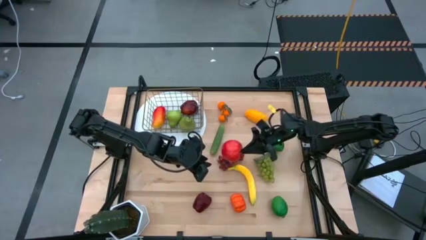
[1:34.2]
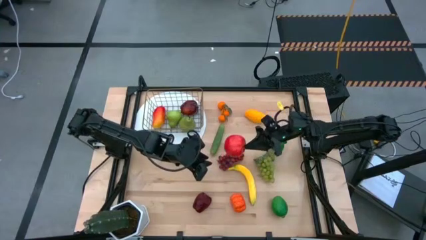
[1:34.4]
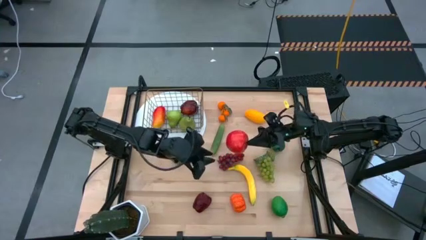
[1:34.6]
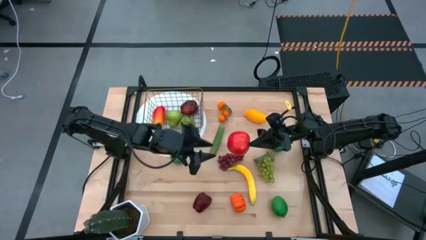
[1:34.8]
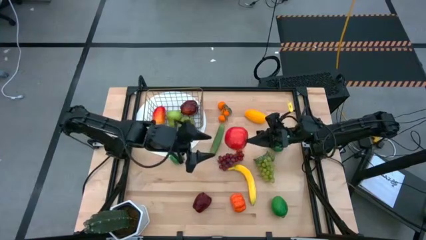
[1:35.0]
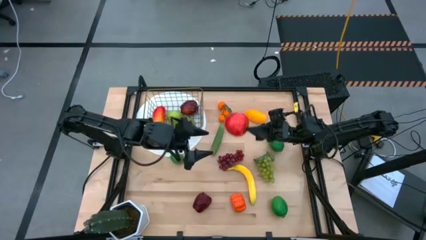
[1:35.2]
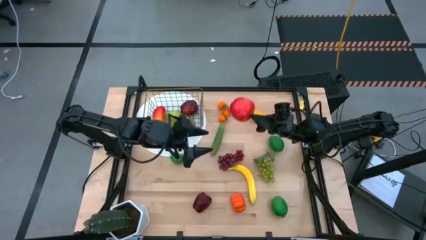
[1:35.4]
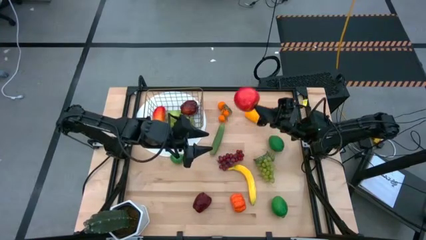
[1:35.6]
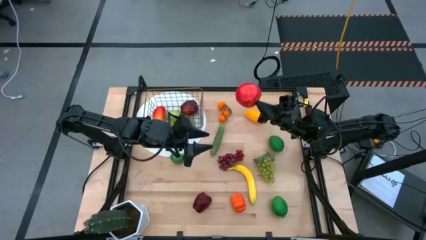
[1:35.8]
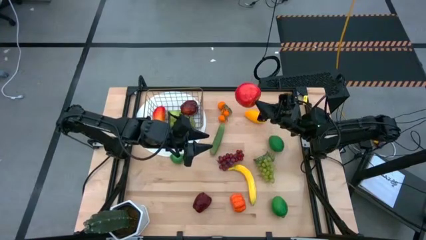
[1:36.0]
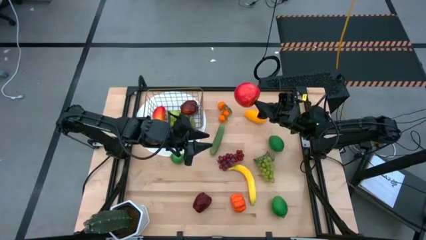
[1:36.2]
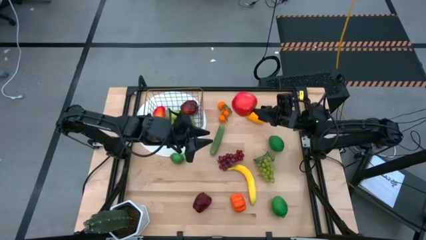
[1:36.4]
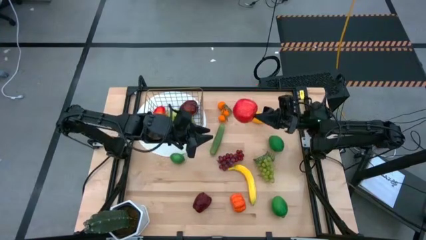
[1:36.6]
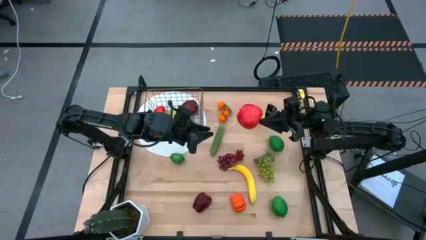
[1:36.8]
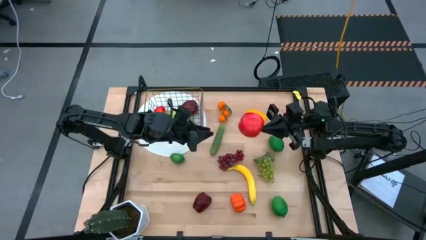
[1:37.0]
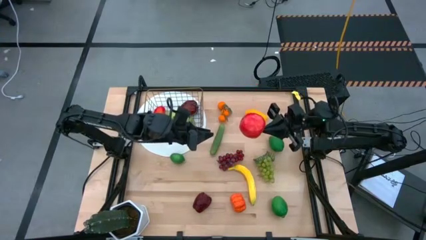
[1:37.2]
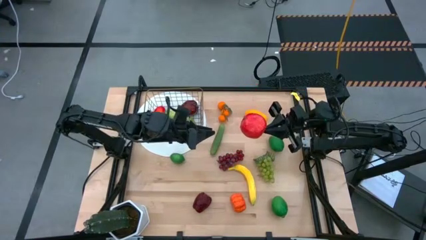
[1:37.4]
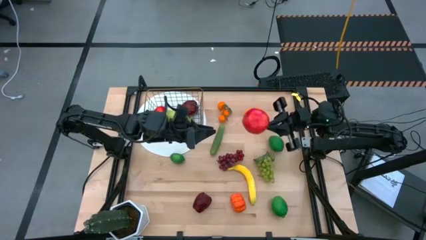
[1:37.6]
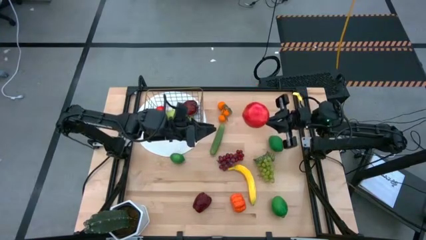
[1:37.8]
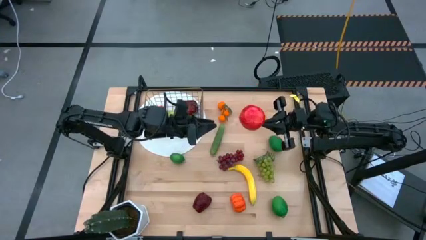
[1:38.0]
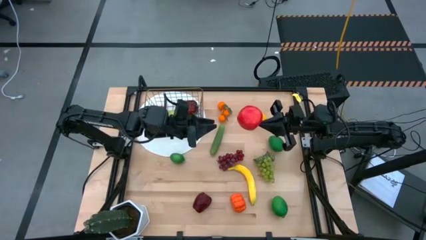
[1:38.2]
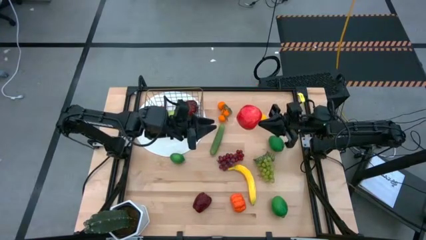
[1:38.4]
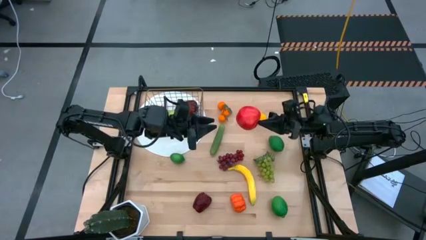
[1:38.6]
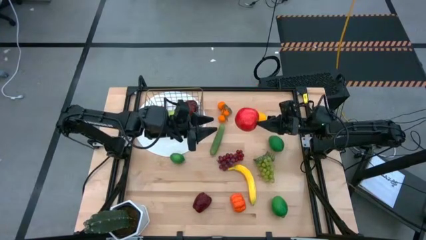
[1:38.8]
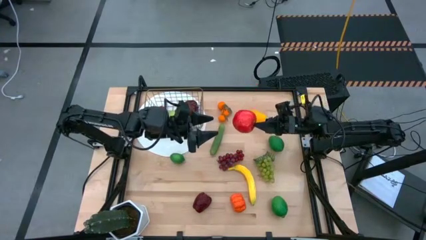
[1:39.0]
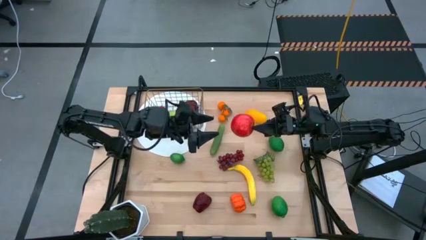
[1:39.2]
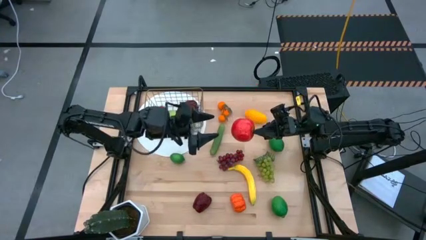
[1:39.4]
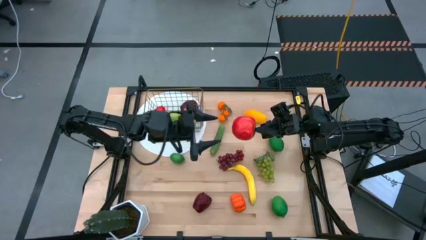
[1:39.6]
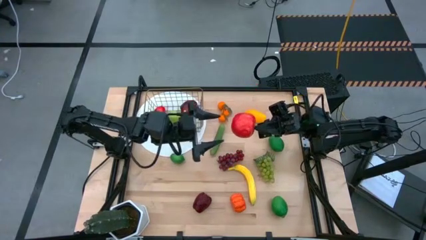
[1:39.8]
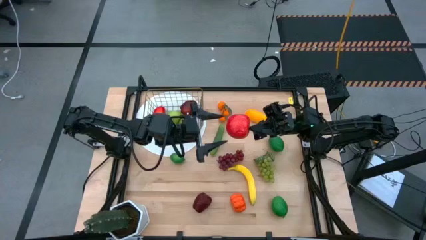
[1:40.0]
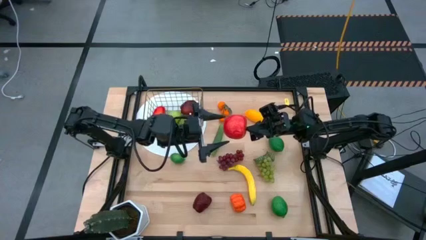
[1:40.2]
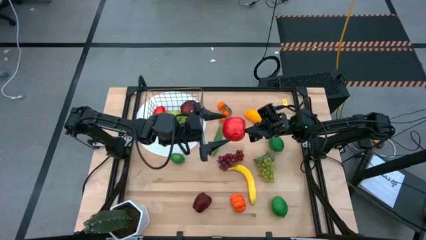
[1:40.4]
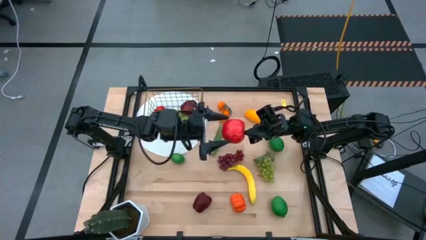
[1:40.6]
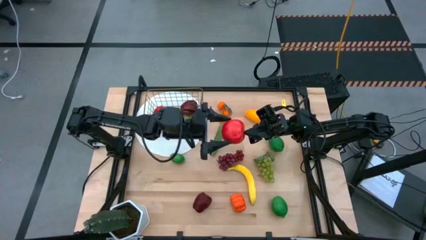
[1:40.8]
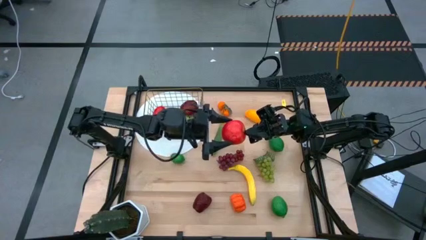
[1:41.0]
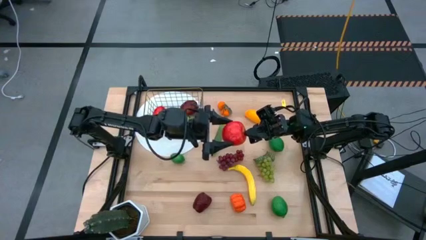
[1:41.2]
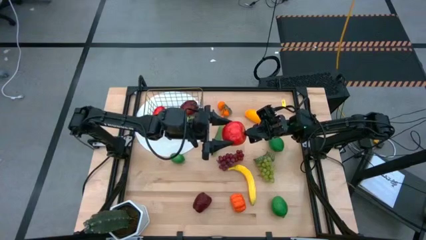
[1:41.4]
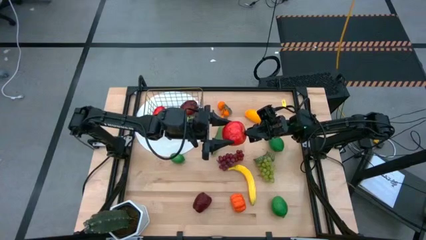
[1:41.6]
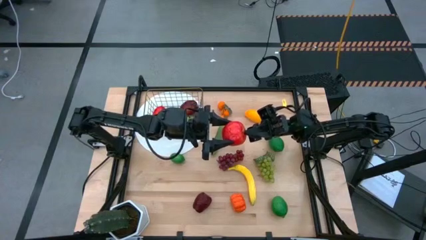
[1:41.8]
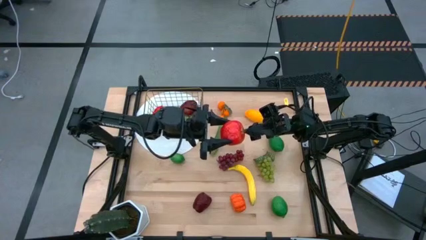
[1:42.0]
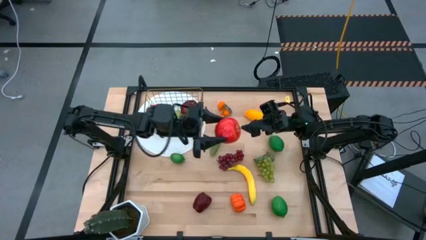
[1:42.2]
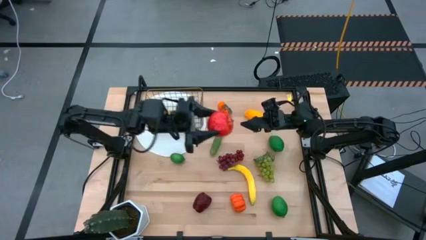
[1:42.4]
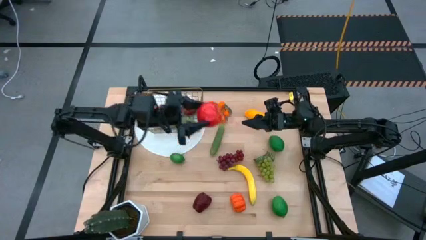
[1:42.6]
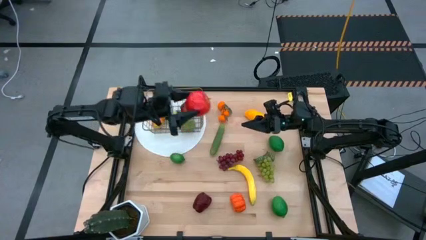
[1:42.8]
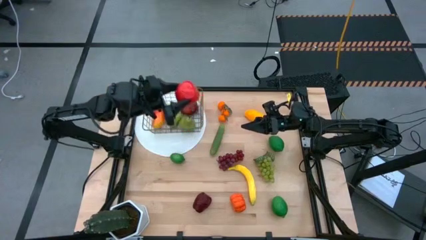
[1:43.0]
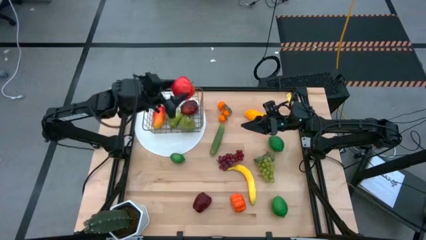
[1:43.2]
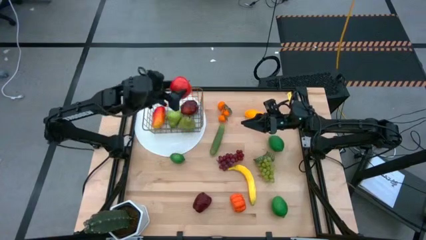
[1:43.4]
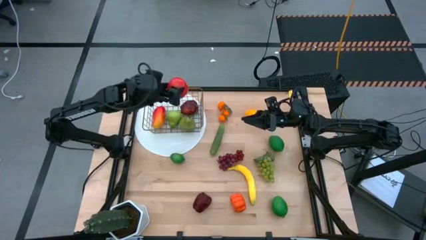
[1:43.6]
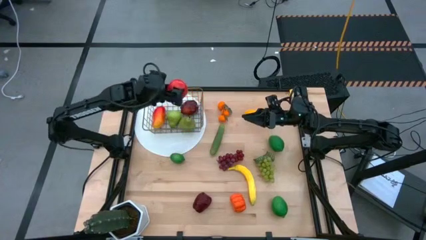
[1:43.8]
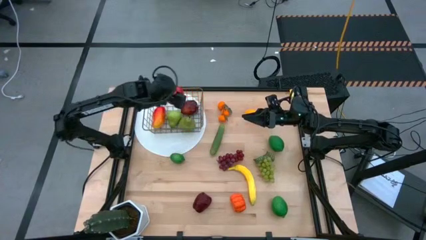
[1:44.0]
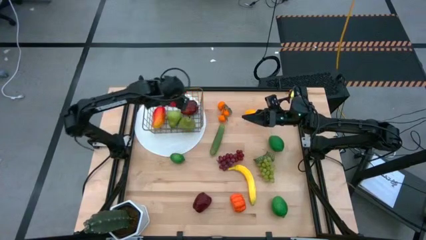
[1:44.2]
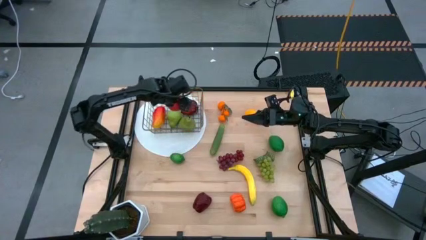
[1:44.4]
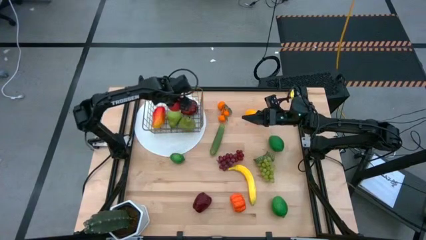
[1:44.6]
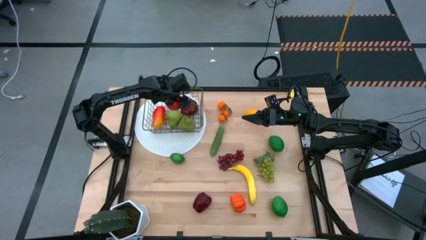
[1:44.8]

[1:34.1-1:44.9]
Task: Build produce basket
Put the orange apple into the wired basket

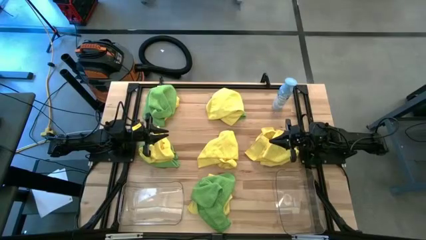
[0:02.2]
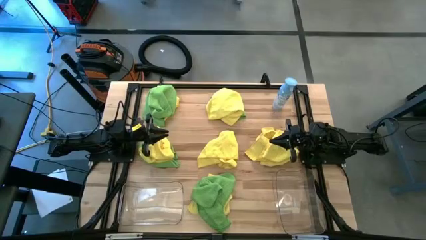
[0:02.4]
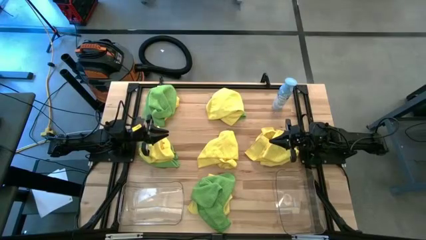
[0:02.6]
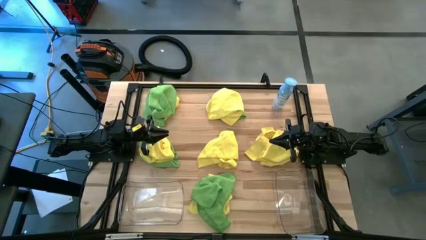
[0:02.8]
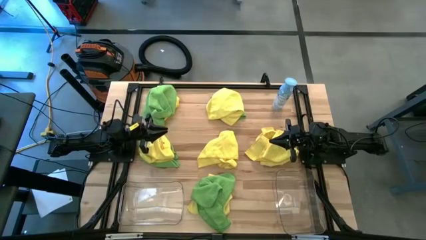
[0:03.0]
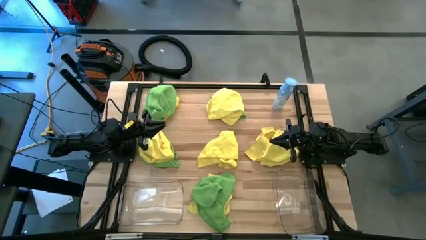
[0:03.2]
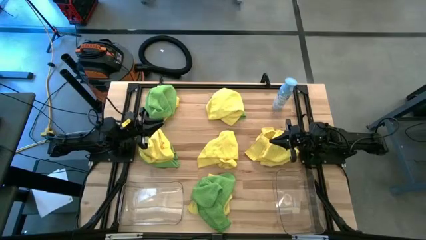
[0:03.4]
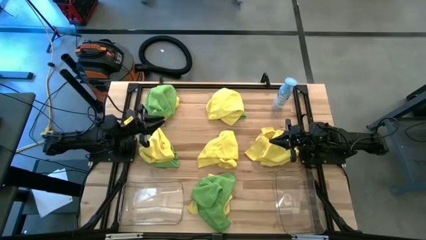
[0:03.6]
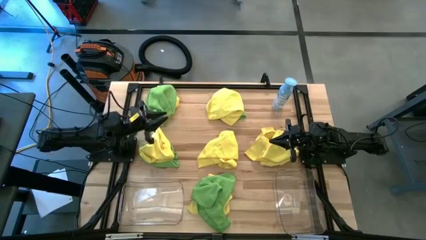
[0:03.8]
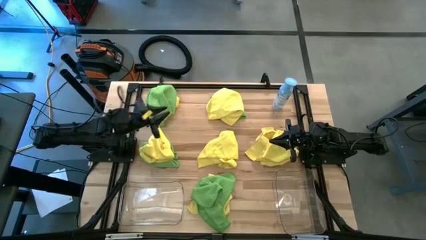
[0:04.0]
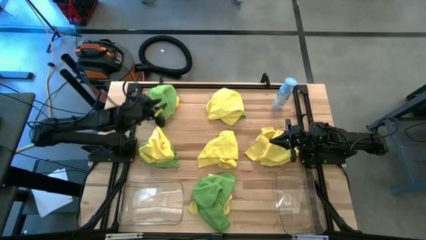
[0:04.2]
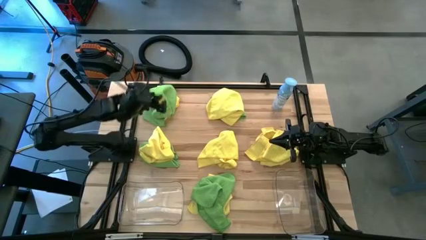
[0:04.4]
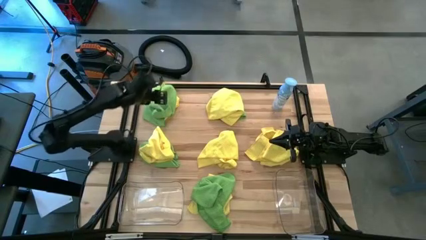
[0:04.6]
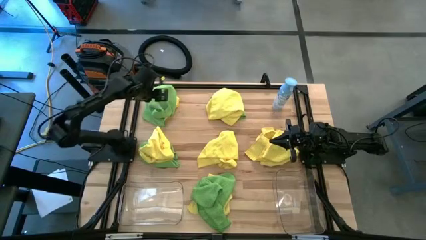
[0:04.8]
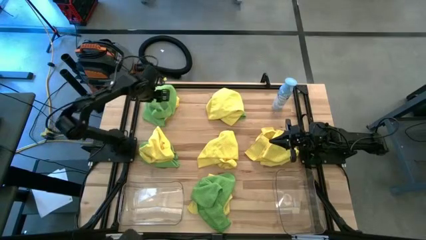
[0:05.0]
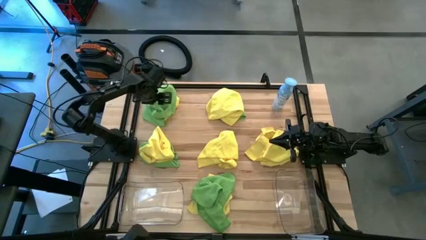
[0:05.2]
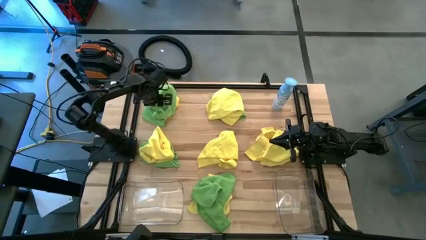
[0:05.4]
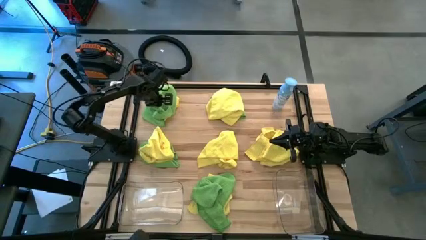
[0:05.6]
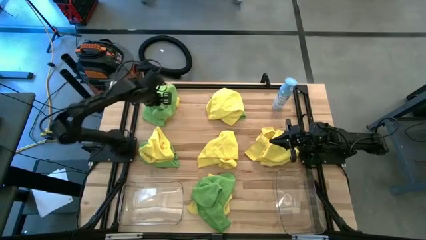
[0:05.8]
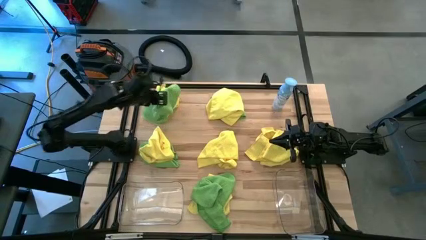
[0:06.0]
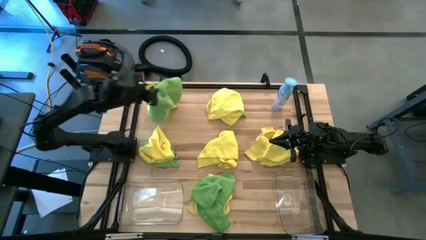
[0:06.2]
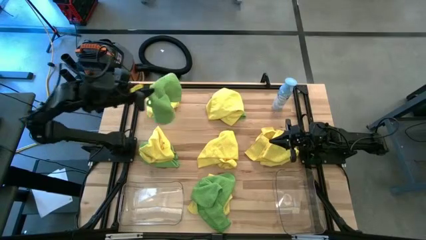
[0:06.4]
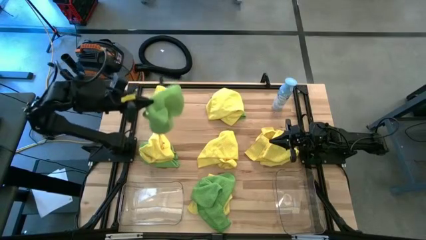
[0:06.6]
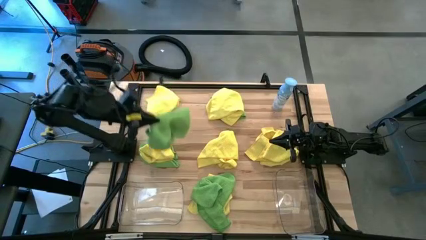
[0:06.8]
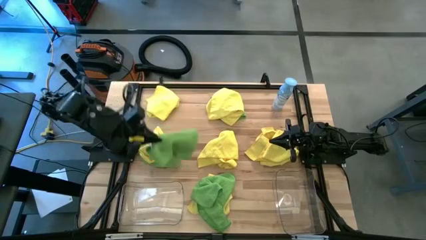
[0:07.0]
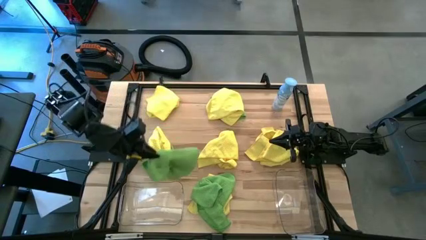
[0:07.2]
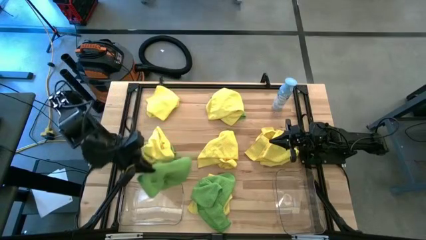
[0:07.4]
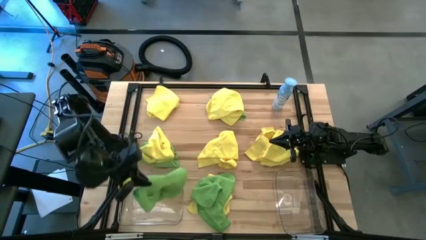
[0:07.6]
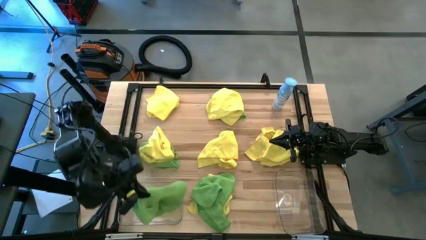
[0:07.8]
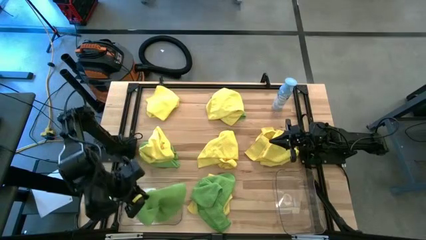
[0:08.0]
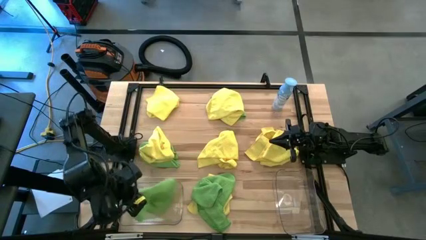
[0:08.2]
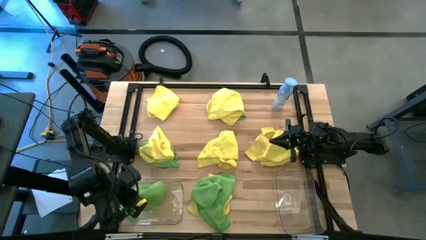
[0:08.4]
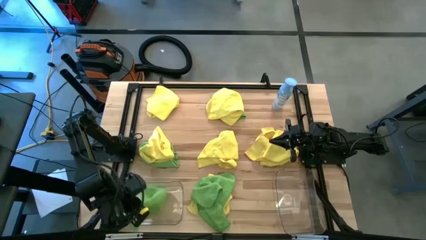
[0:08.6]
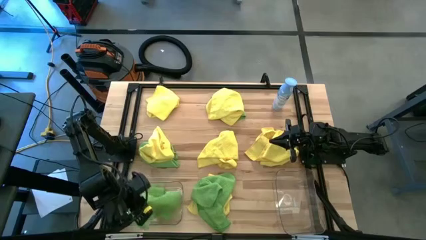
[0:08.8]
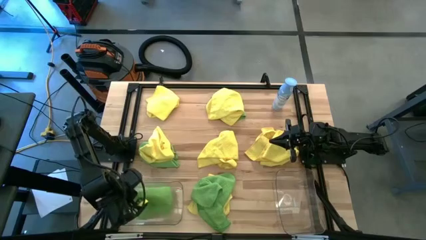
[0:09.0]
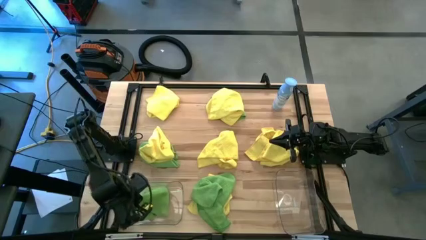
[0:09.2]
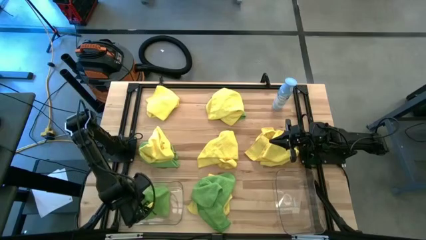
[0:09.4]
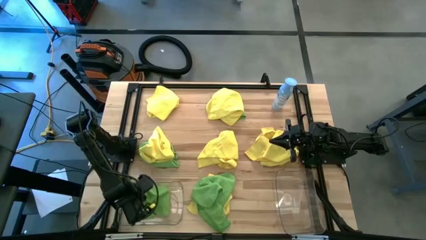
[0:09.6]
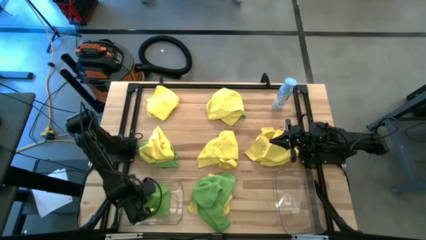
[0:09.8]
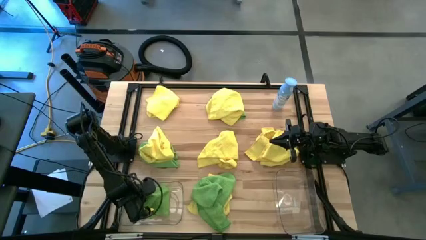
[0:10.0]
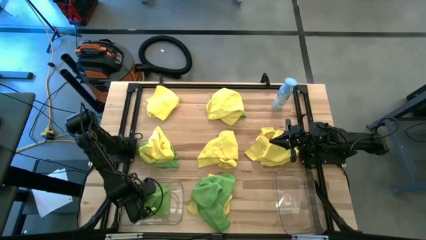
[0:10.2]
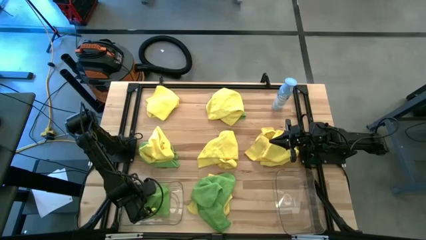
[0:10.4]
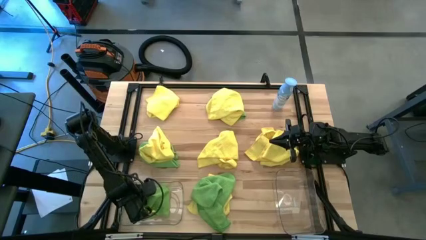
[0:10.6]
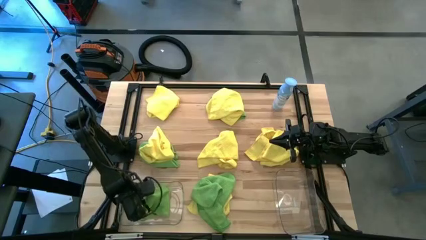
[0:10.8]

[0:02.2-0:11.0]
Task: Sort microfiber towel by color & place in baskets
Put the top left green microfiber towel into the left transparent bin
